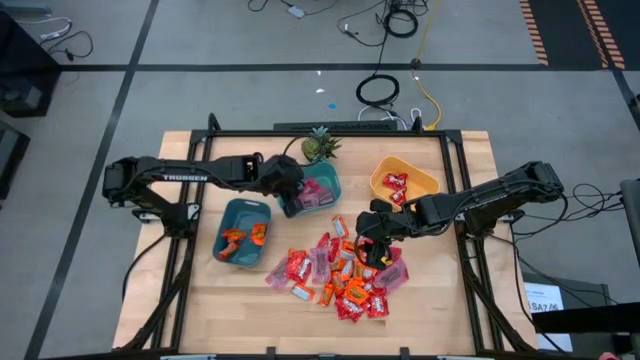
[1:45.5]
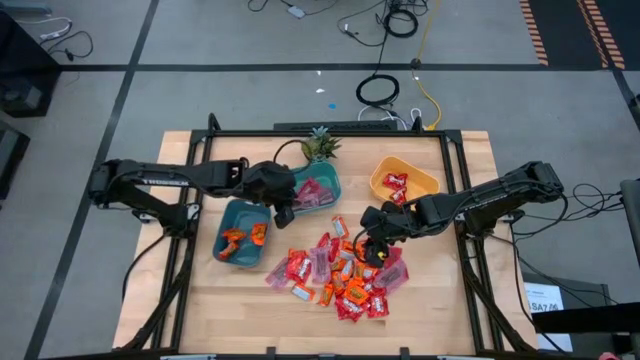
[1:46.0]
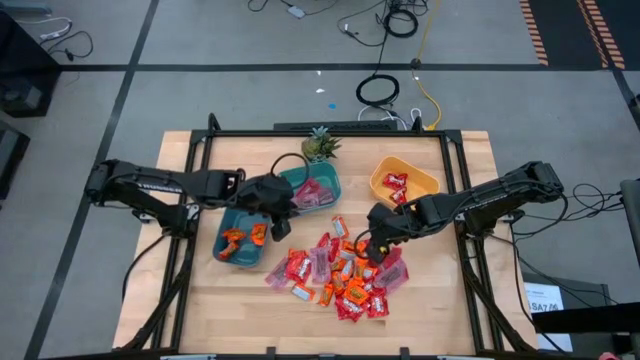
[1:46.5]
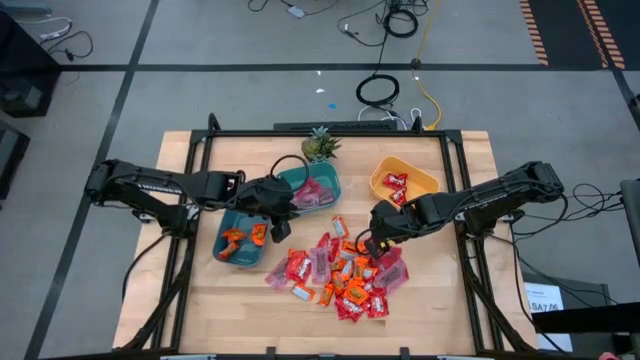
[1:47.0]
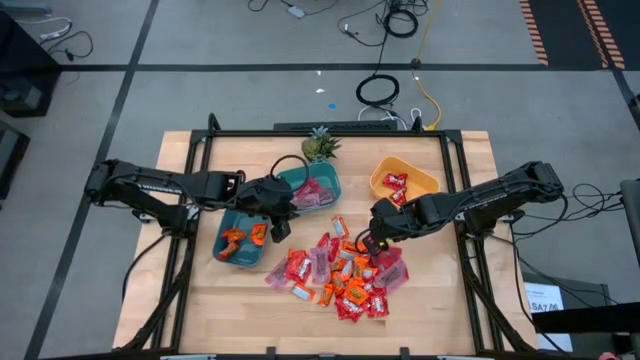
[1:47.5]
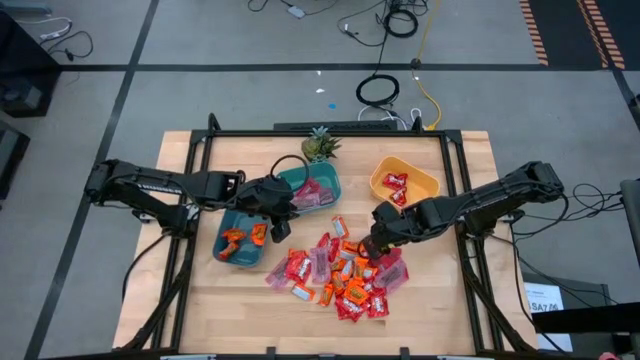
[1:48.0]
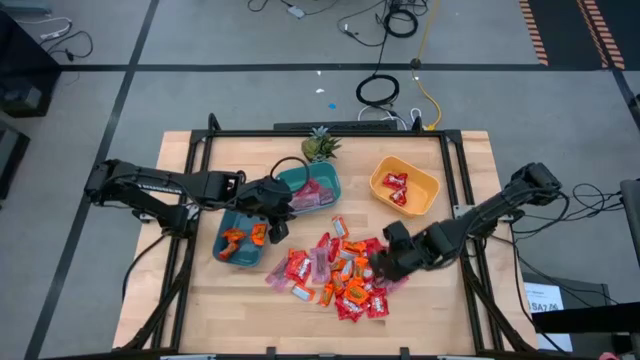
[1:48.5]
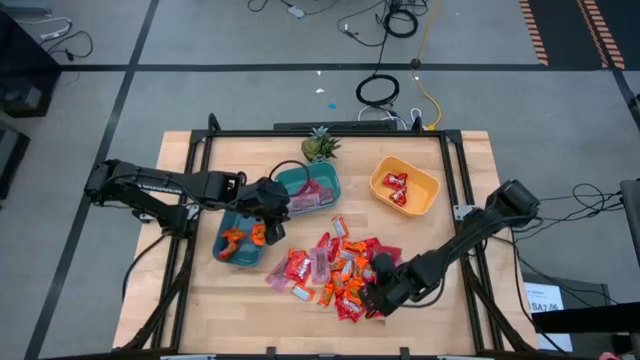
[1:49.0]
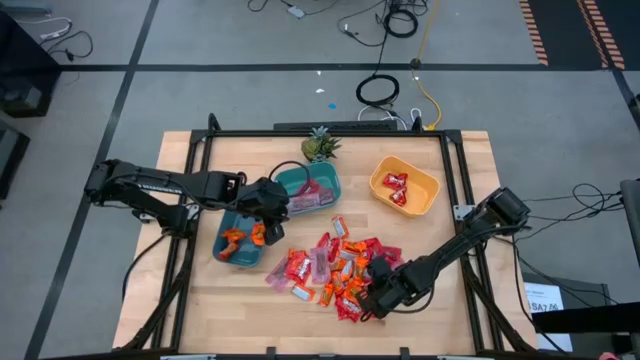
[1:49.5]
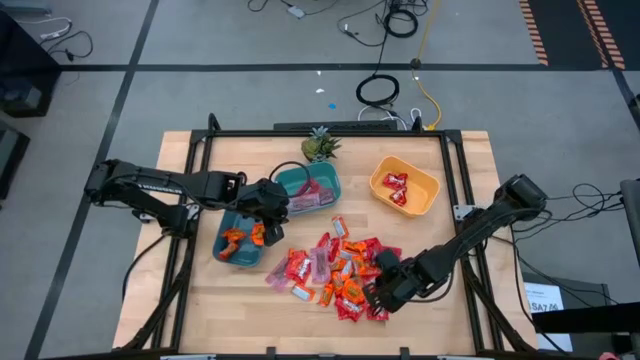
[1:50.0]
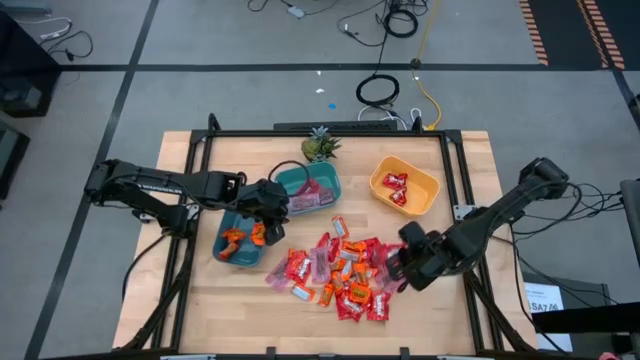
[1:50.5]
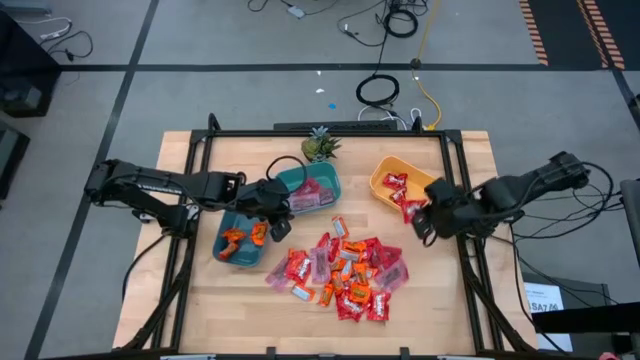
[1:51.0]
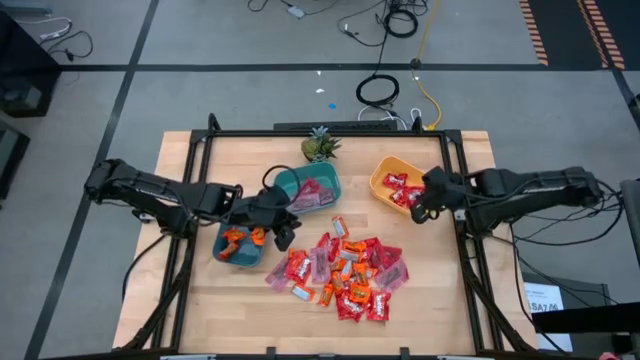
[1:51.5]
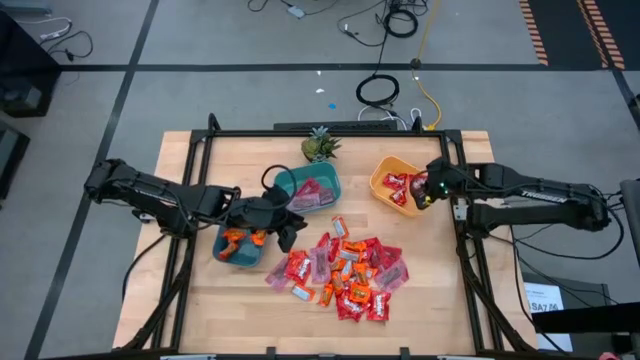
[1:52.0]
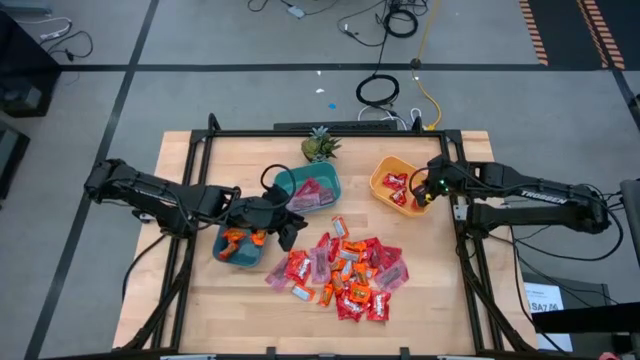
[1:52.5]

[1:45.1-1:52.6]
Task: Sort candy
Put the red candy into the yellow bin

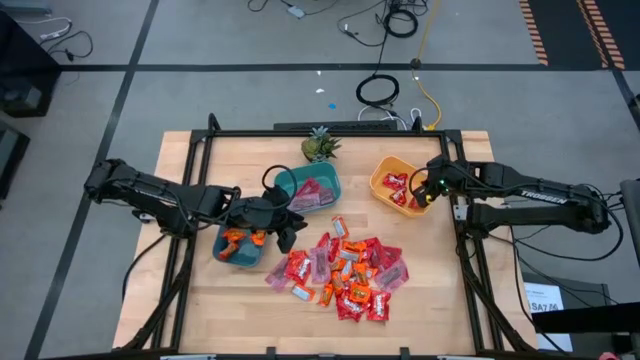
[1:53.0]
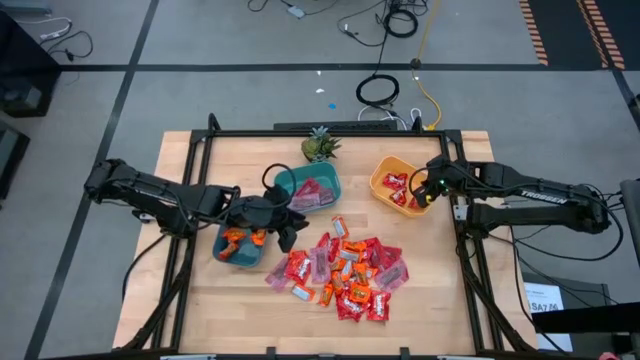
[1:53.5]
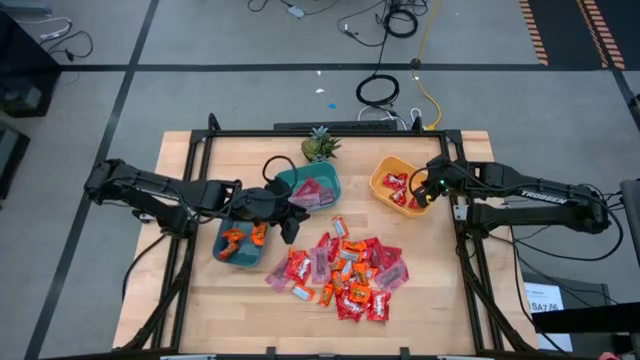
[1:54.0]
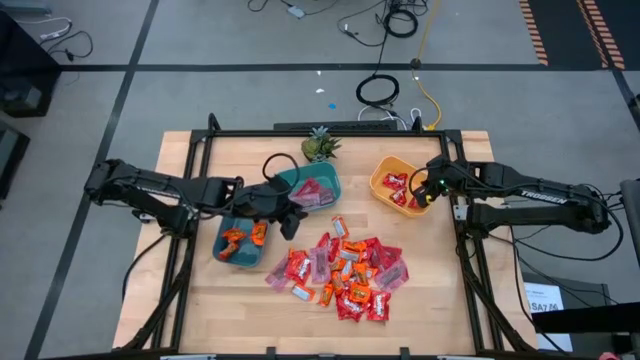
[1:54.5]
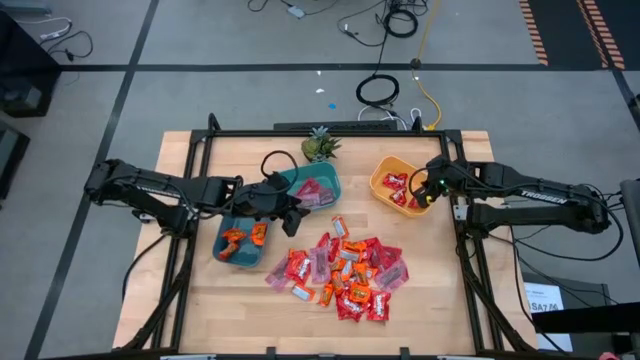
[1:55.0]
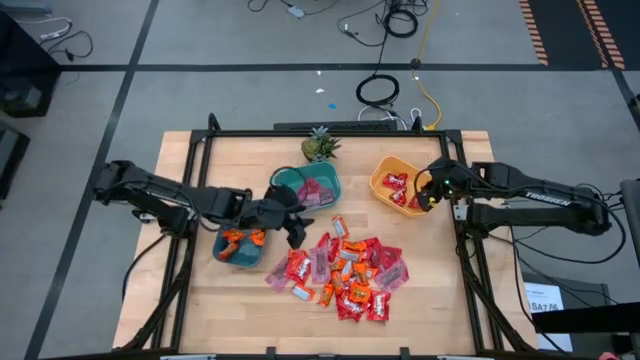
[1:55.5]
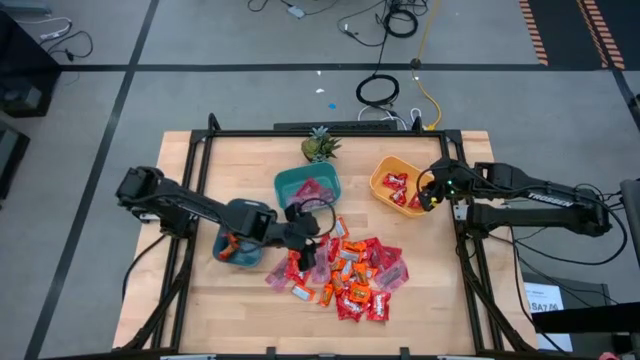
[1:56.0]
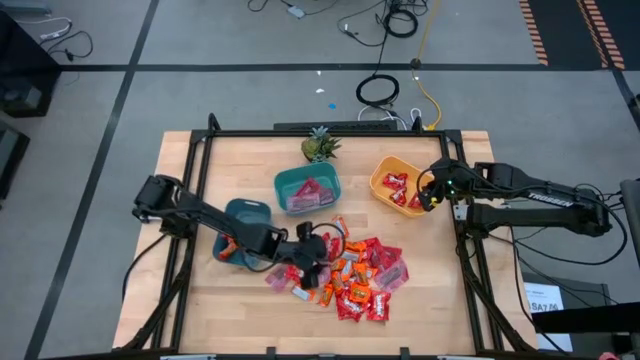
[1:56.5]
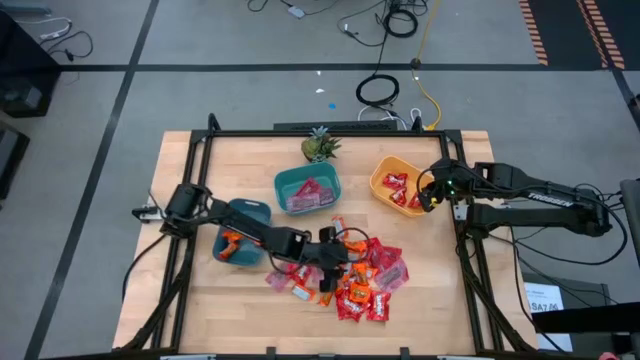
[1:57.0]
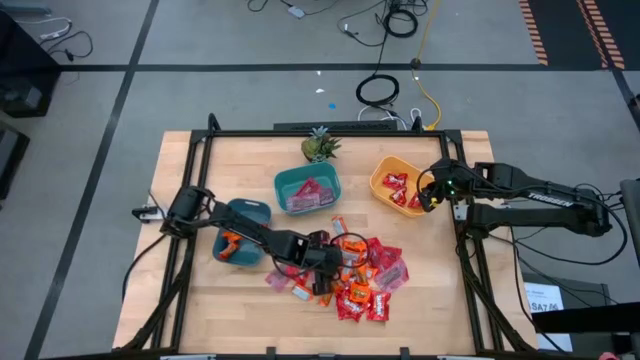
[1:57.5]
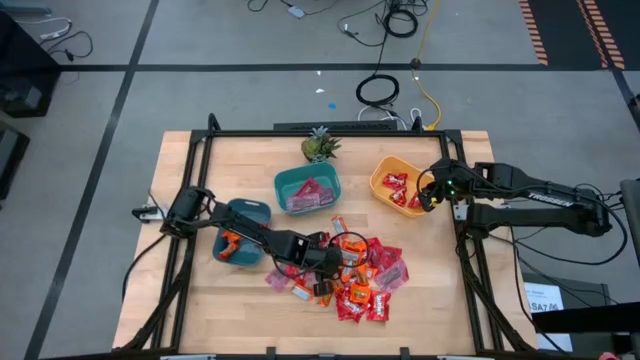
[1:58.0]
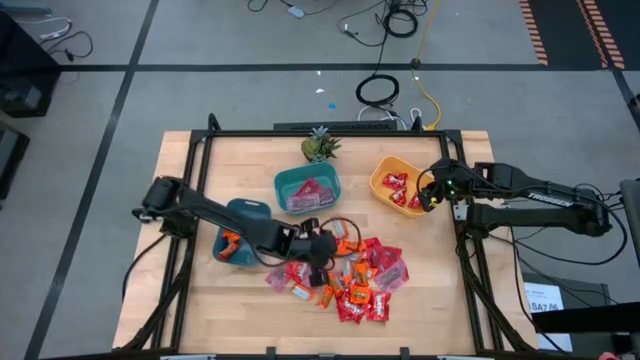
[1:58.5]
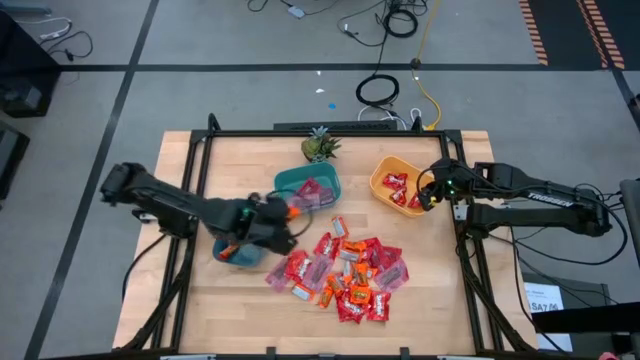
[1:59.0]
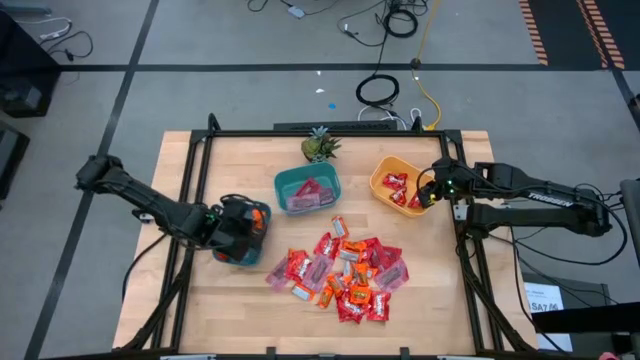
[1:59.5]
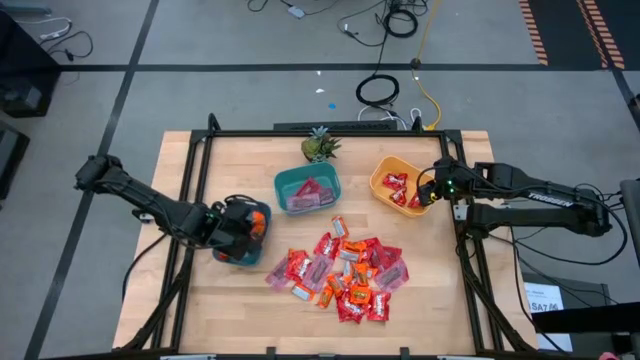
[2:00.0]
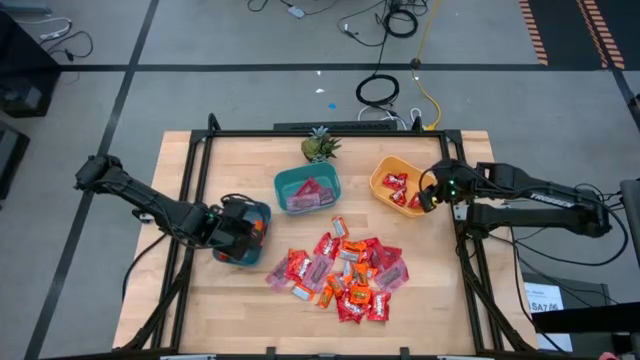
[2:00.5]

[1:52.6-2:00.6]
Put the orange chocolate into the blue bin

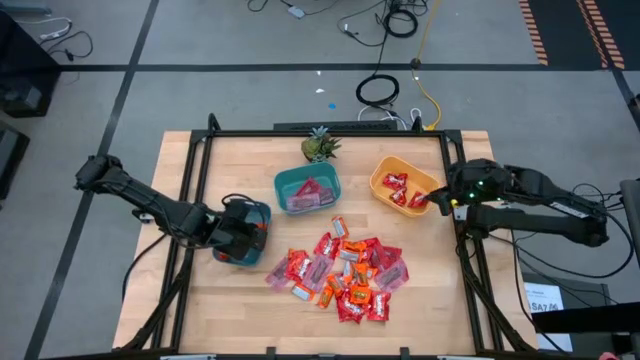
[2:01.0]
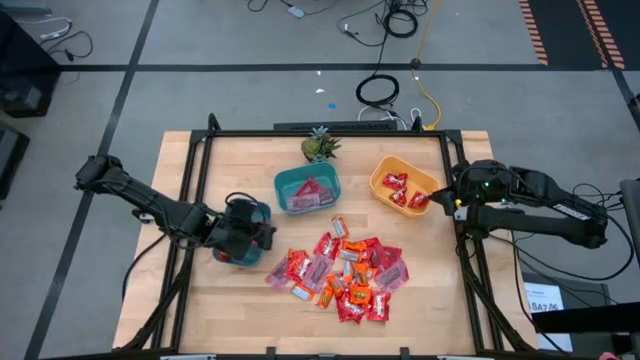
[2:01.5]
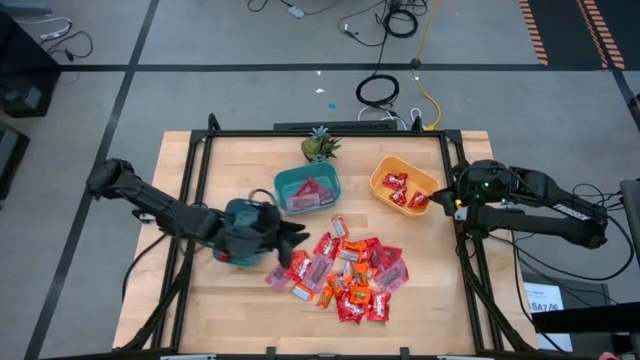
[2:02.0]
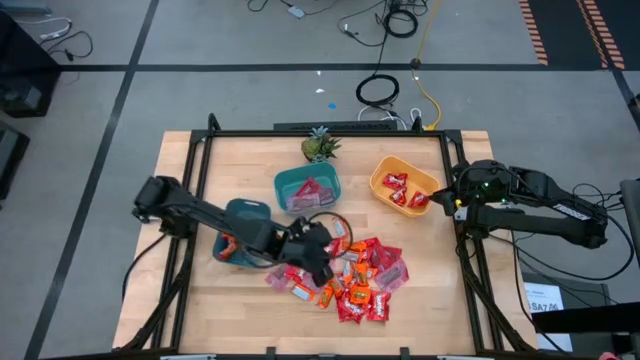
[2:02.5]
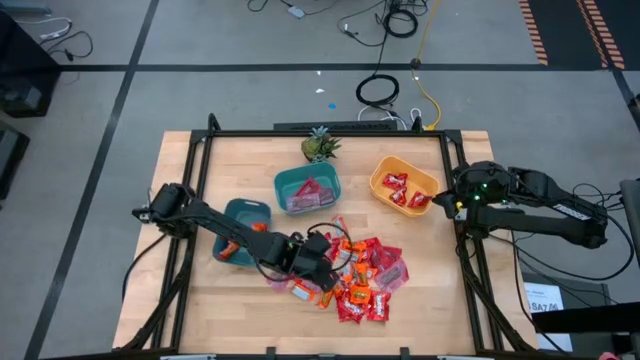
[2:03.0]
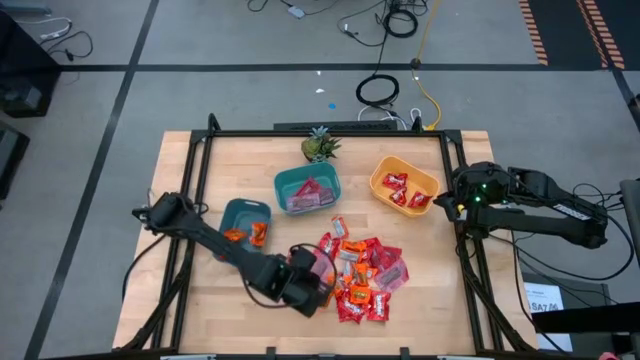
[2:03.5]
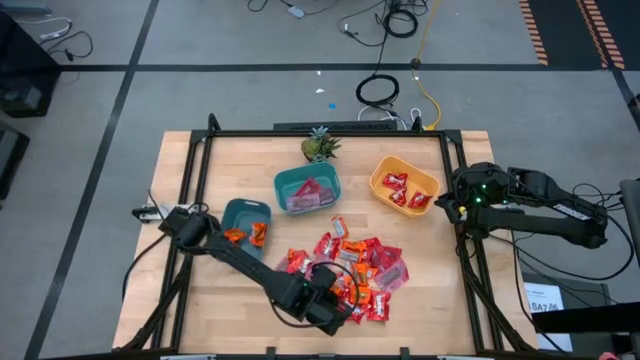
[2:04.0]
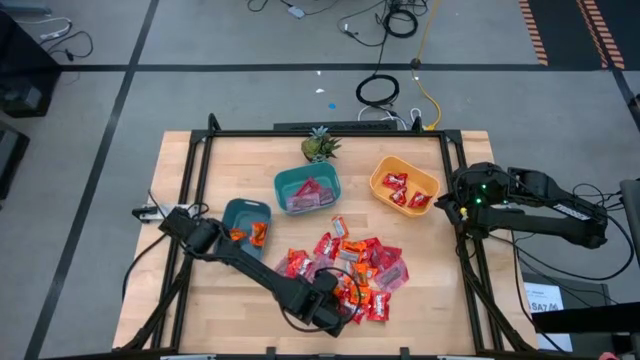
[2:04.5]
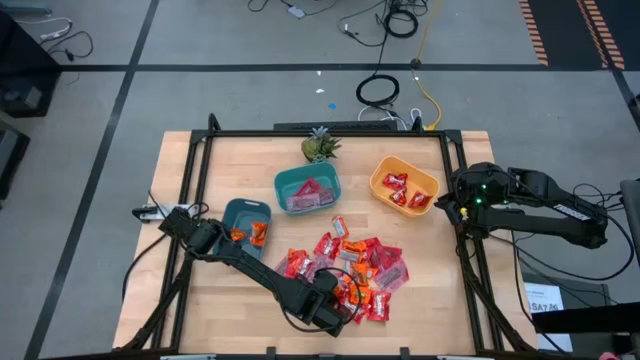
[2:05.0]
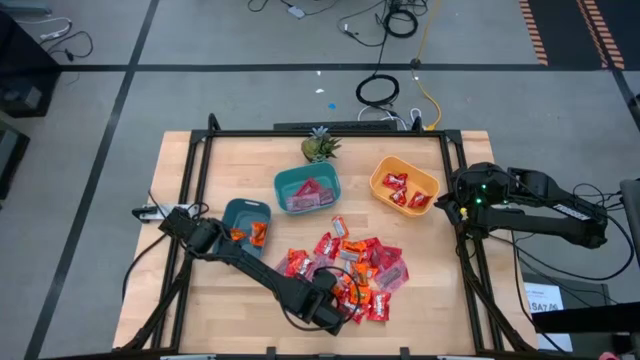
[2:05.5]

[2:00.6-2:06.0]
Put the orange chocolate into the blue bin
